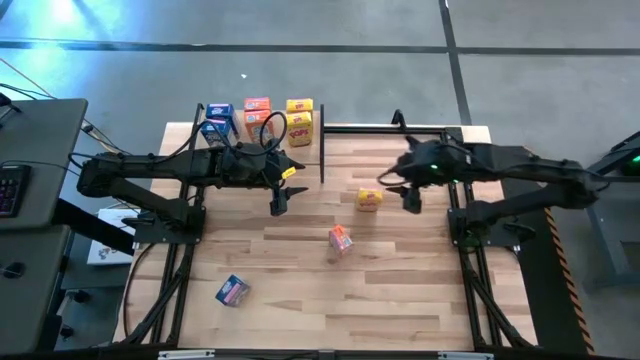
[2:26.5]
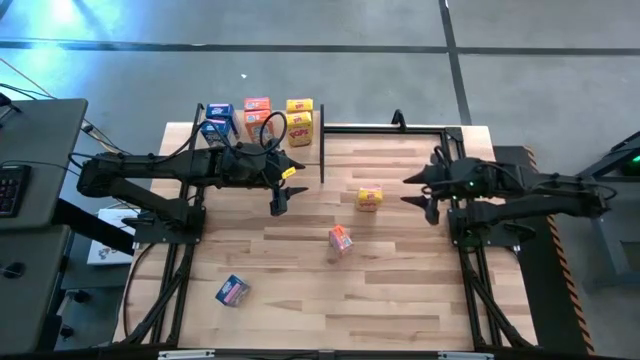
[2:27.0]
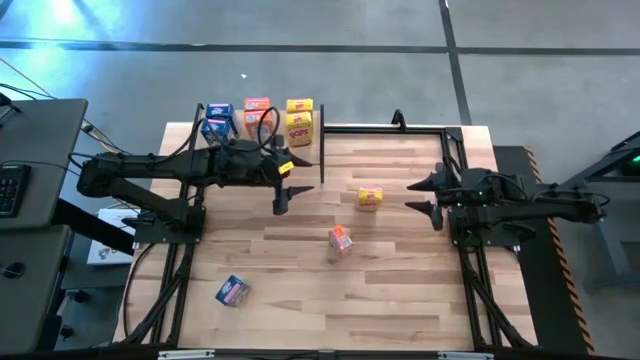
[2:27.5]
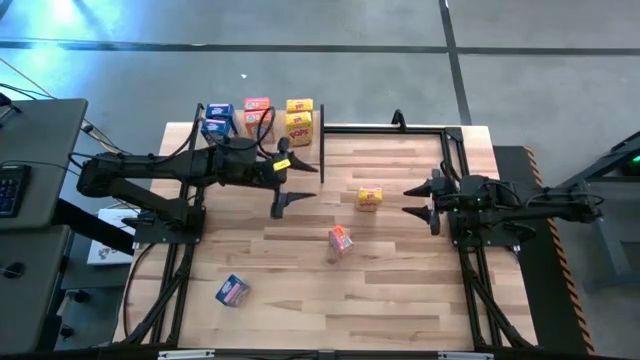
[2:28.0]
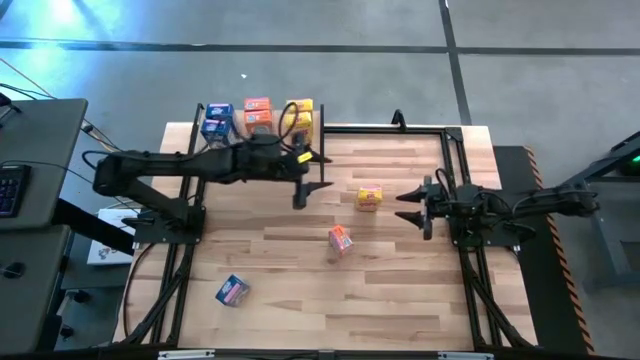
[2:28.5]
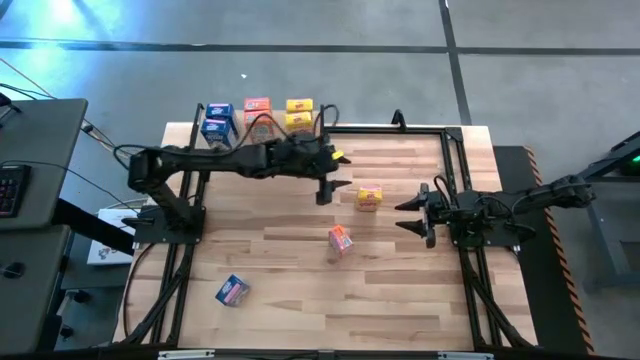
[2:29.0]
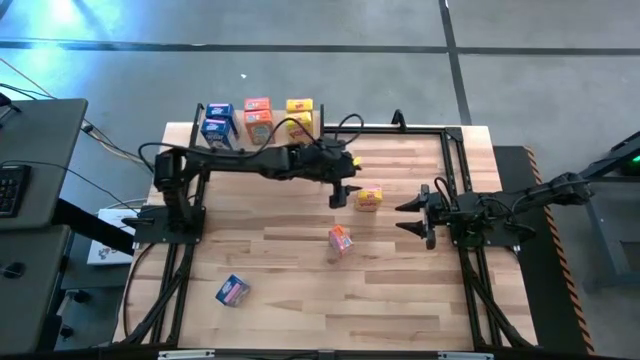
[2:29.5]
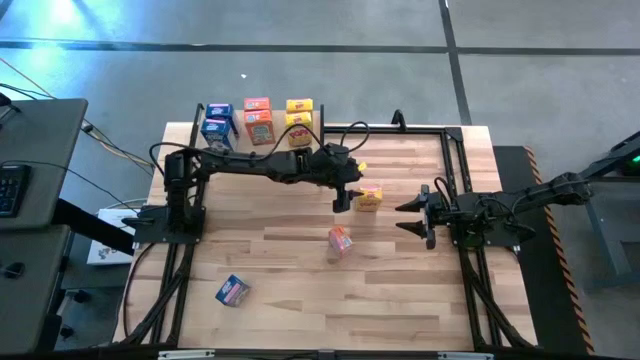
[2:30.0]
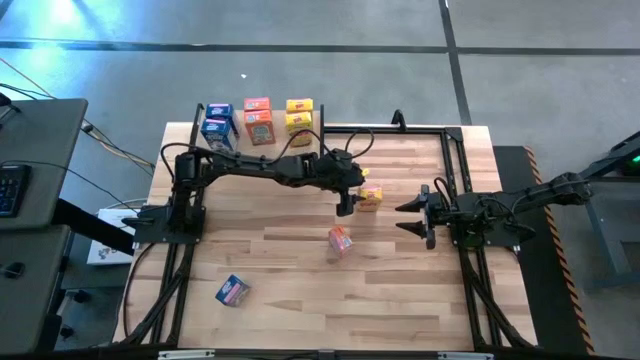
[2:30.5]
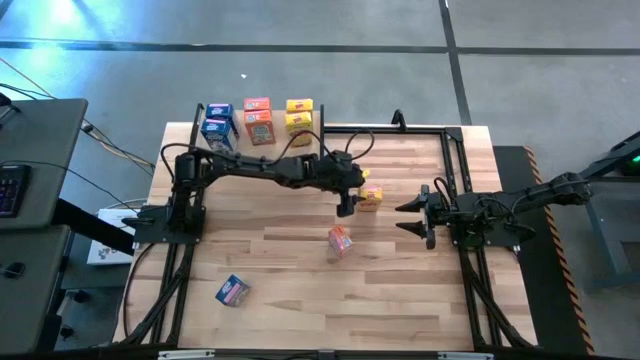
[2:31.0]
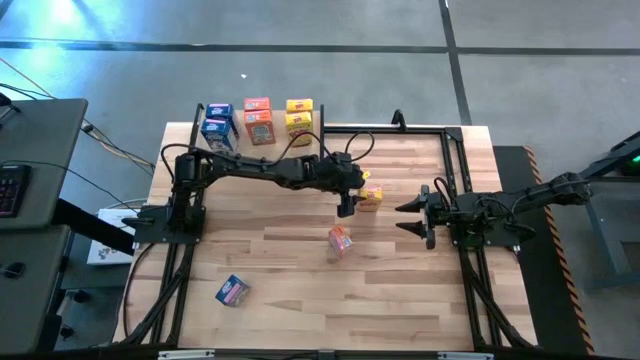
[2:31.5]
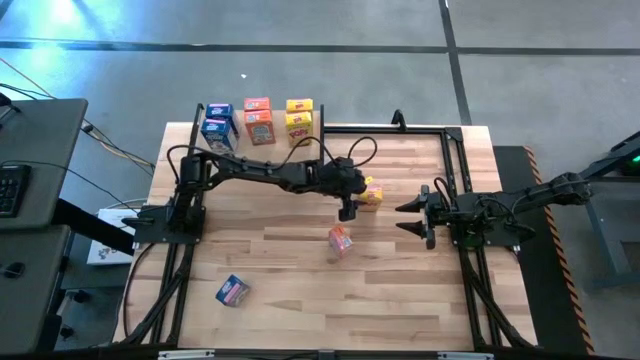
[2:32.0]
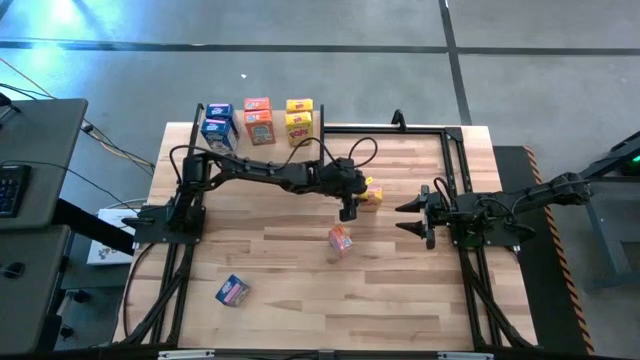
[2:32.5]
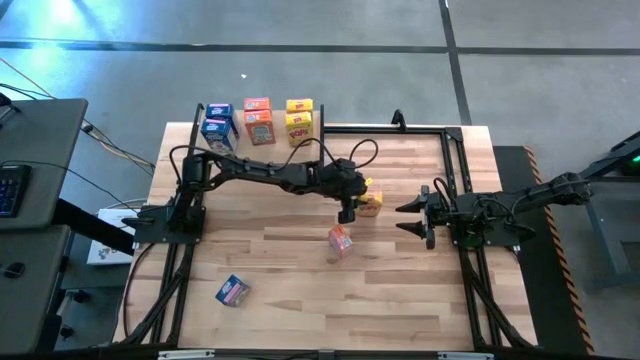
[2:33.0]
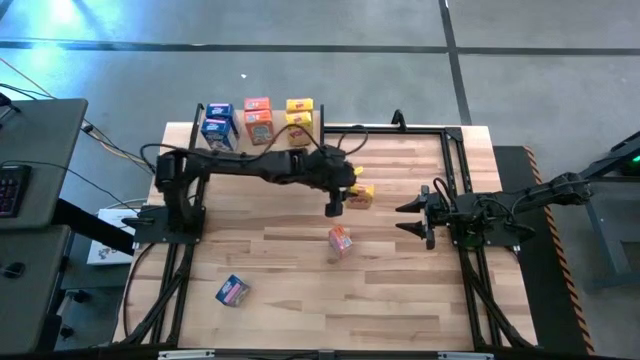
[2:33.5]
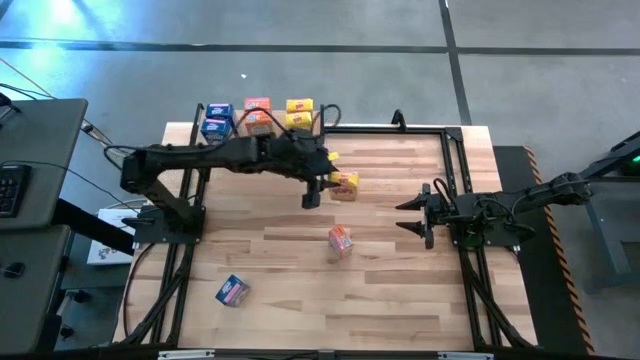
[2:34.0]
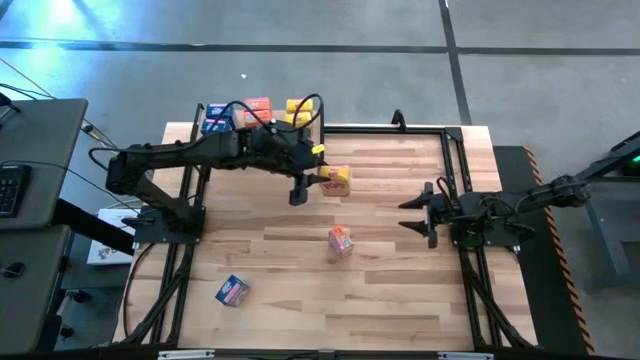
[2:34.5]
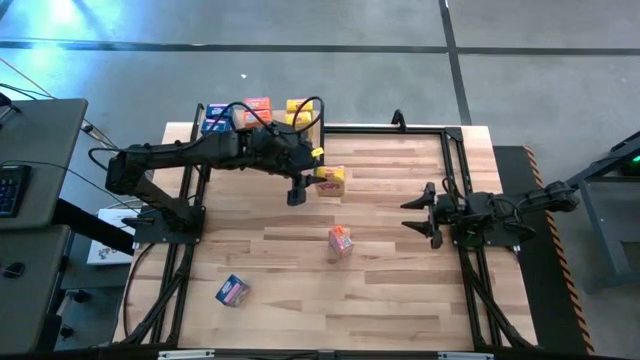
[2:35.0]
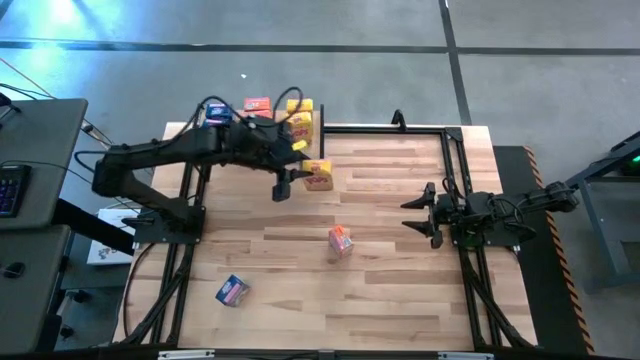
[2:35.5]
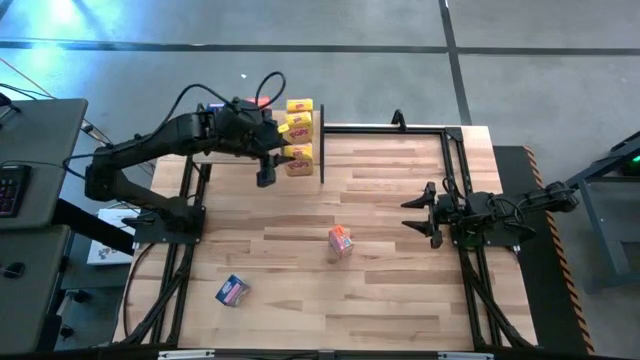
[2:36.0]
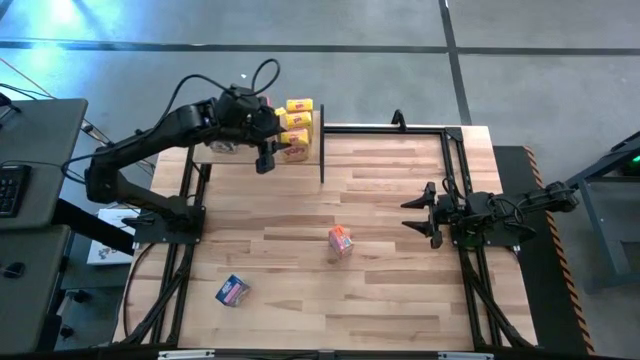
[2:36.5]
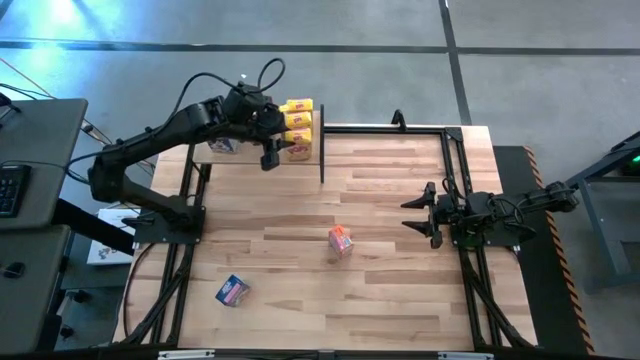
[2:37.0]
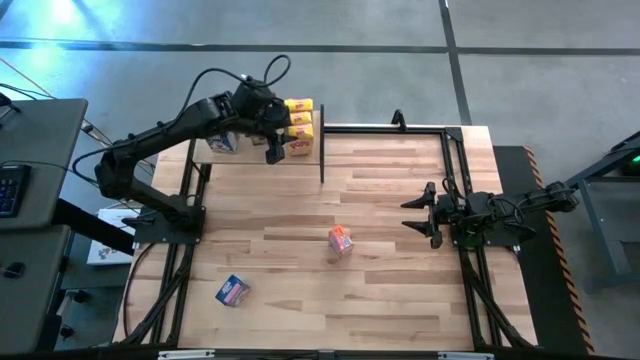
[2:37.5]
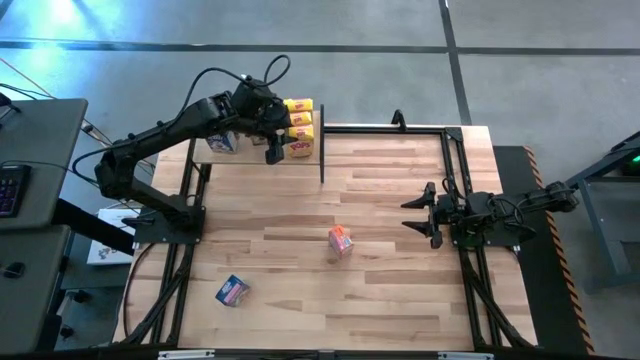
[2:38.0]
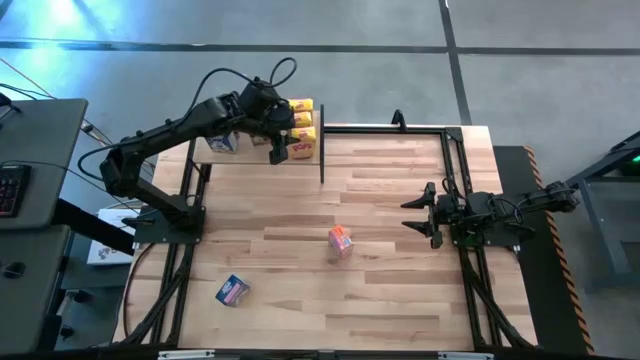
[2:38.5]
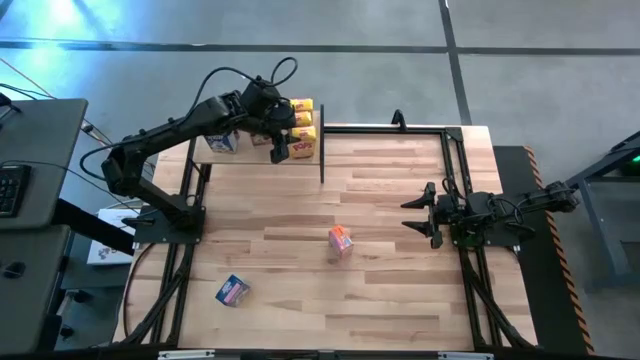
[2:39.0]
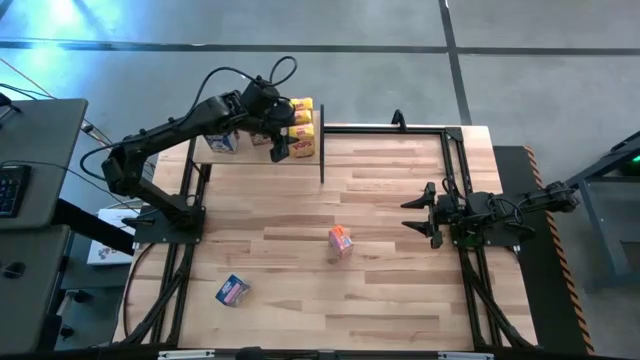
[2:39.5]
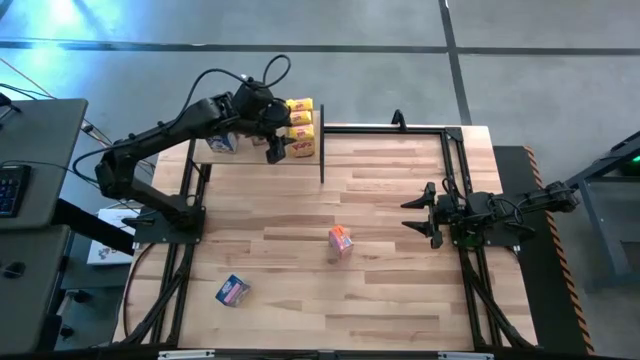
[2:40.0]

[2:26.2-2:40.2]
Task: Stack cereal on shelf
Put the yellow cereal box on the shelf aligned with the other yellow cereal boxes

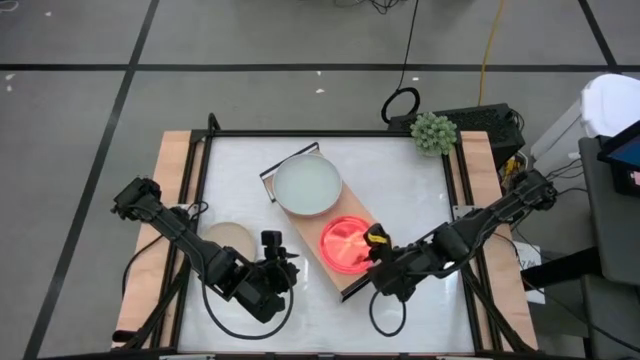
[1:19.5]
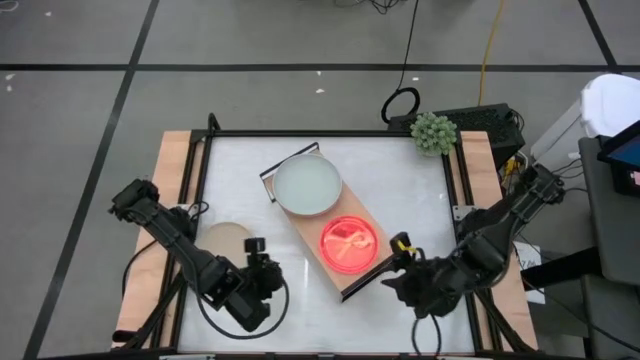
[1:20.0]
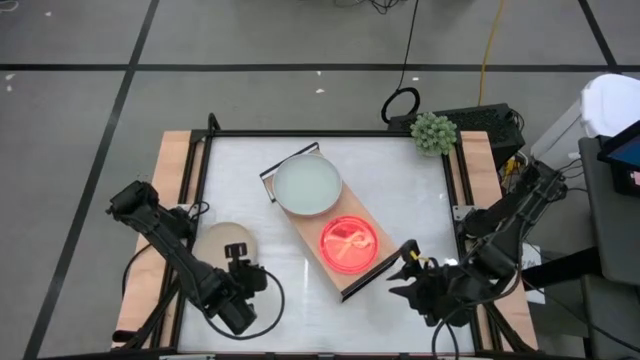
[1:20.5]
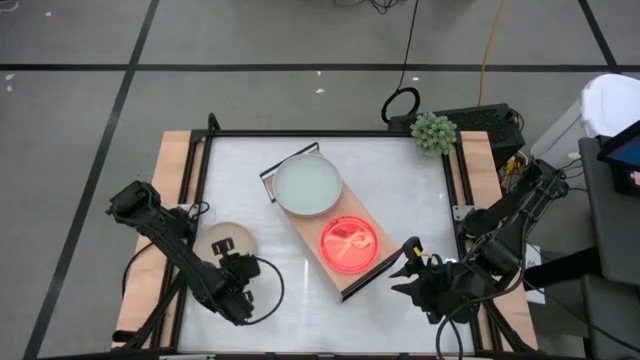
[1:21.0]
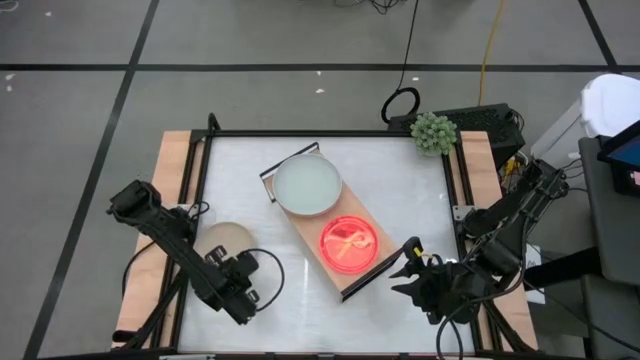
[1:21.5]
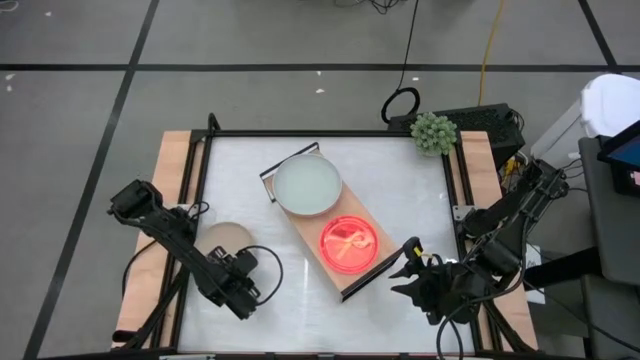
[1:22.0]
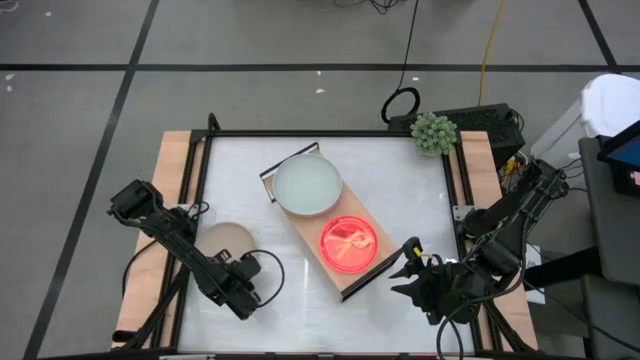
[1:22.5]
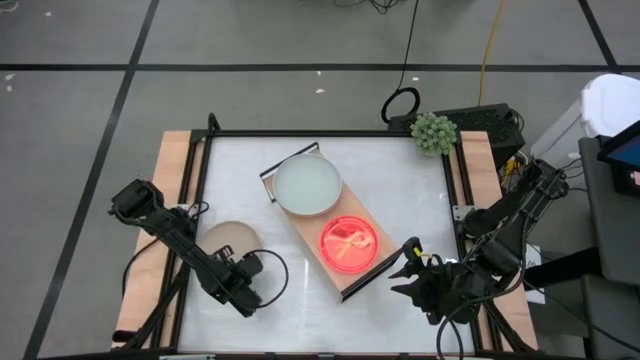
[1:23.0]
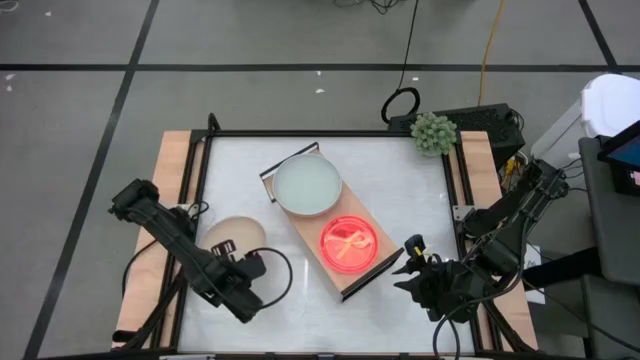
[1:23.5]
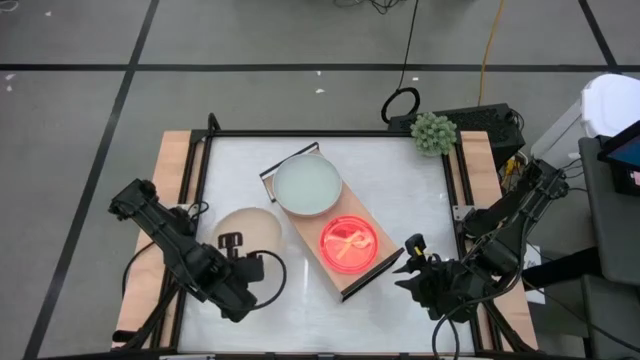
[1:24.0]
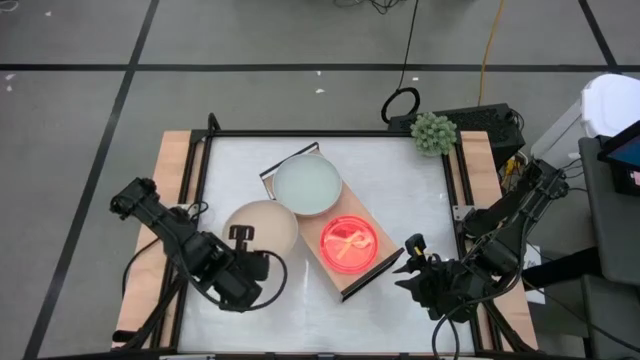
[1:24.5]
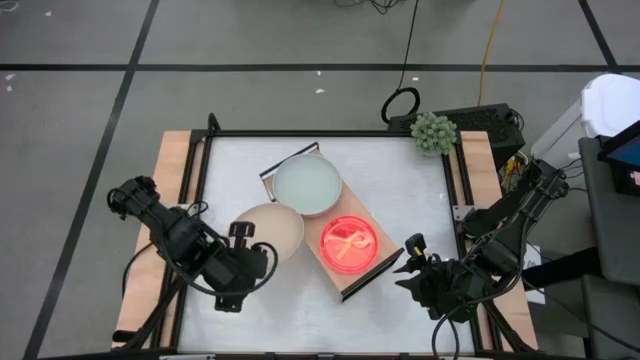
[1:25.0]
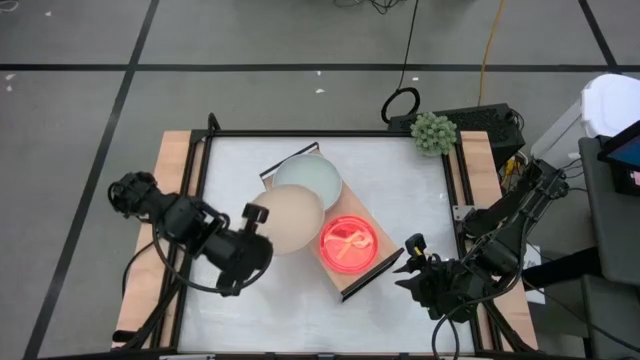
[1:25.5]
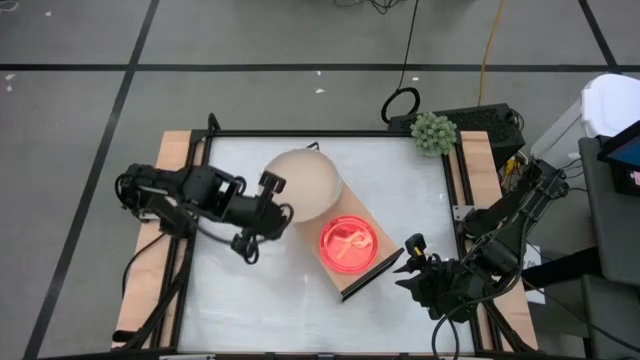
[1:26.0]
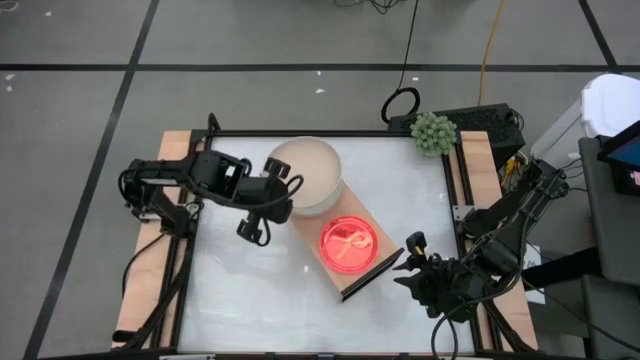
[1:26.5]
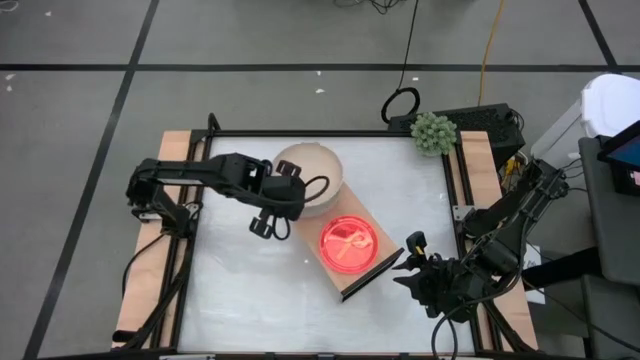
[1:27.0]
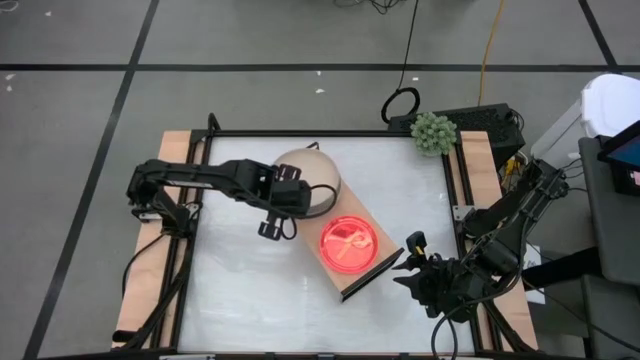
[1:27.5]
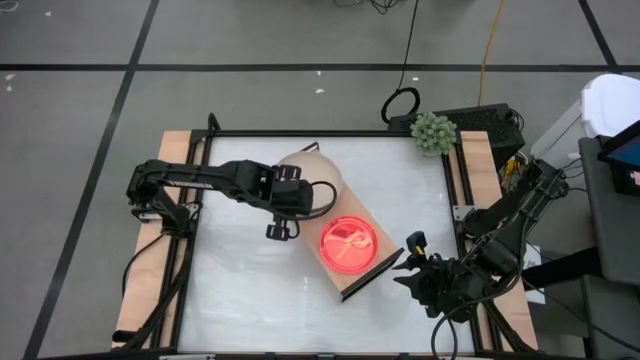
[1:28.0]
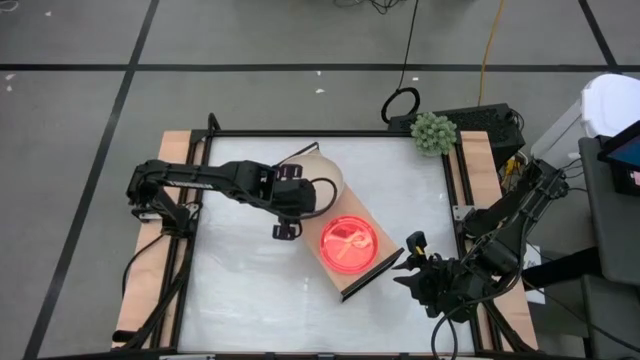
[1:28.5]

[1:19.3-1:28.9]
Task: Place and stack plates onto a shelf
Stack the large brown plate on top of the large gray plate on the shelf
